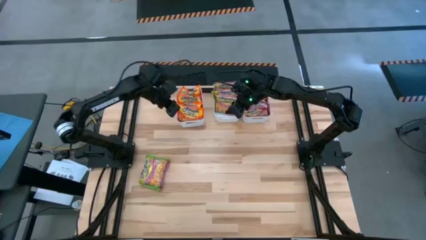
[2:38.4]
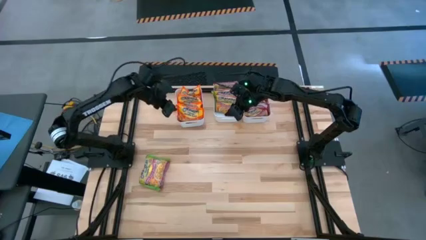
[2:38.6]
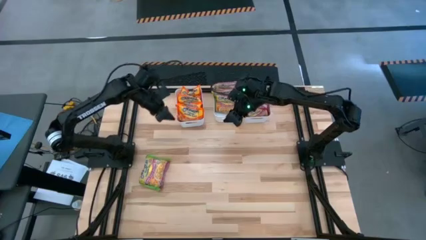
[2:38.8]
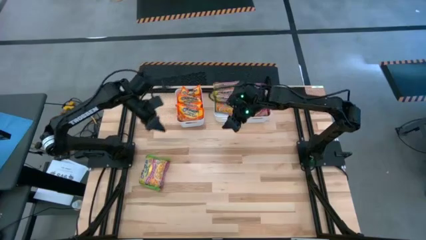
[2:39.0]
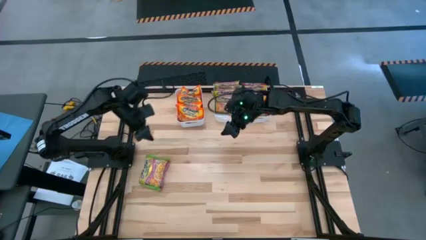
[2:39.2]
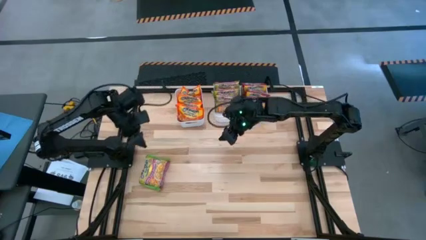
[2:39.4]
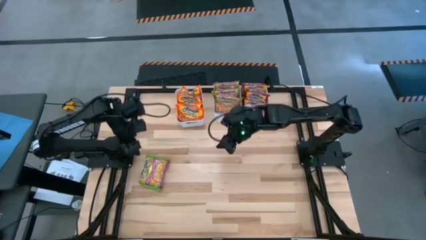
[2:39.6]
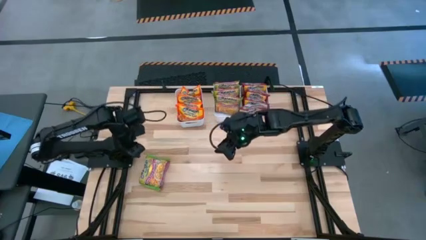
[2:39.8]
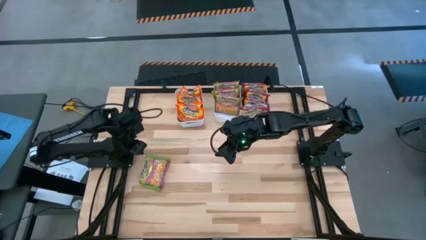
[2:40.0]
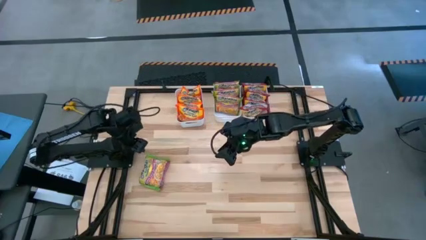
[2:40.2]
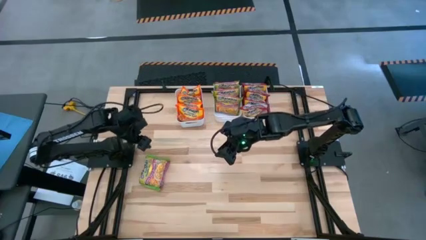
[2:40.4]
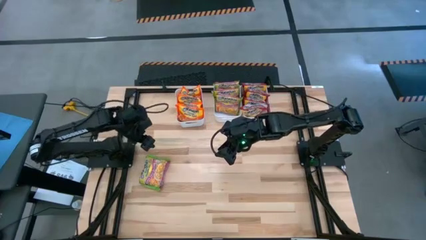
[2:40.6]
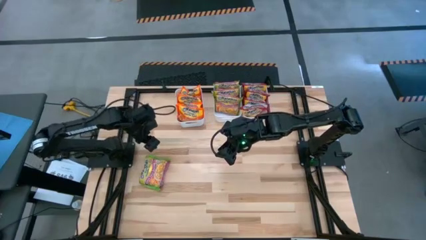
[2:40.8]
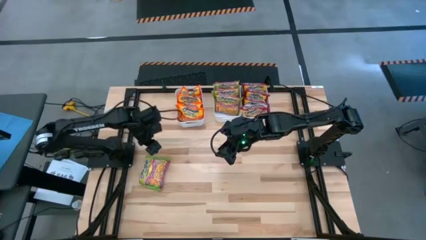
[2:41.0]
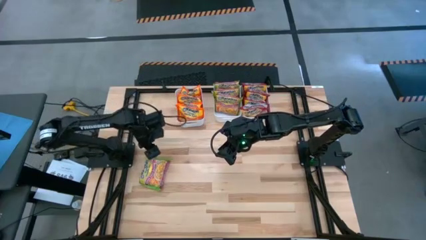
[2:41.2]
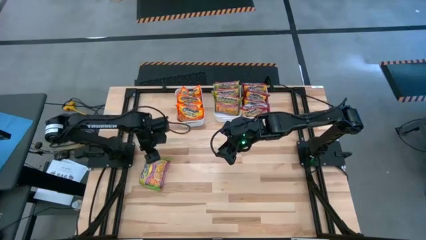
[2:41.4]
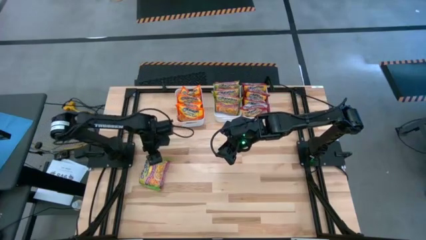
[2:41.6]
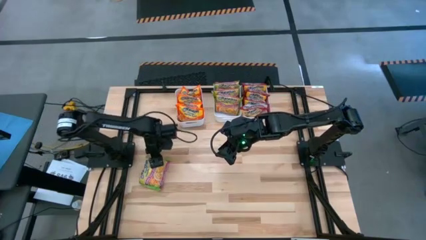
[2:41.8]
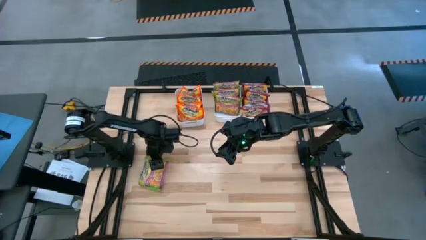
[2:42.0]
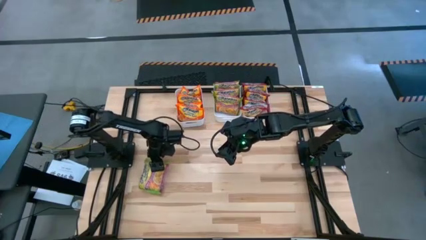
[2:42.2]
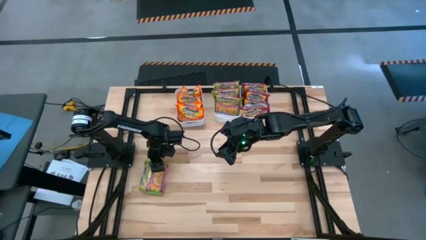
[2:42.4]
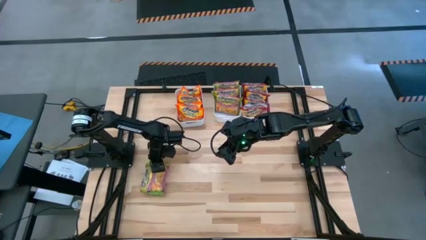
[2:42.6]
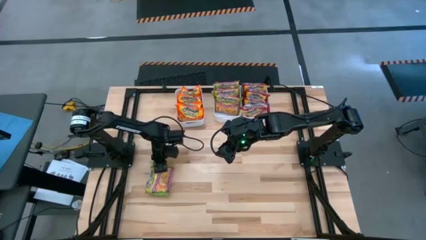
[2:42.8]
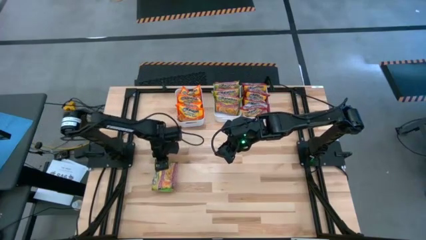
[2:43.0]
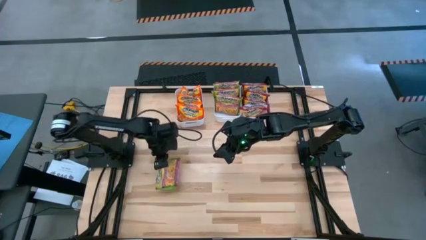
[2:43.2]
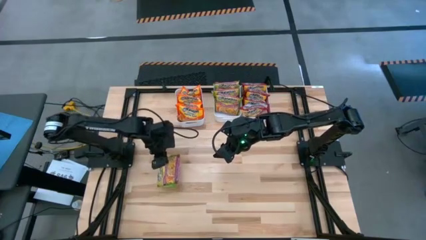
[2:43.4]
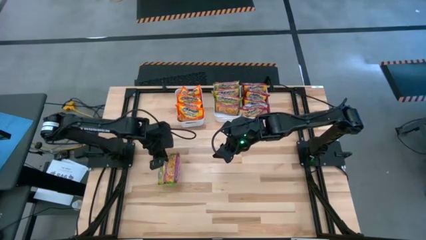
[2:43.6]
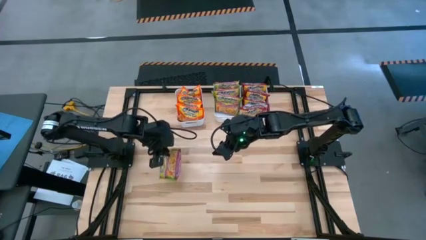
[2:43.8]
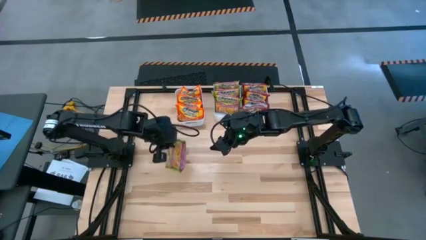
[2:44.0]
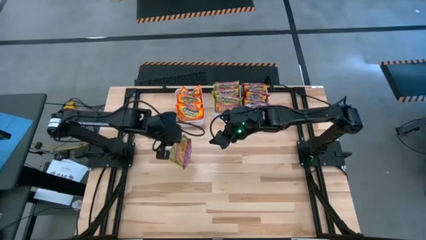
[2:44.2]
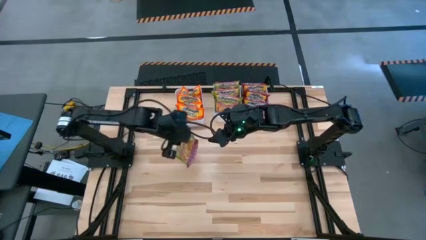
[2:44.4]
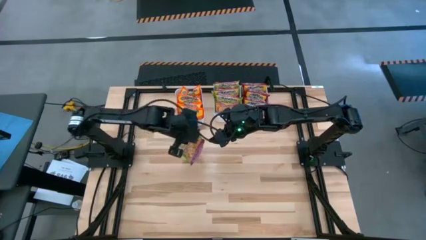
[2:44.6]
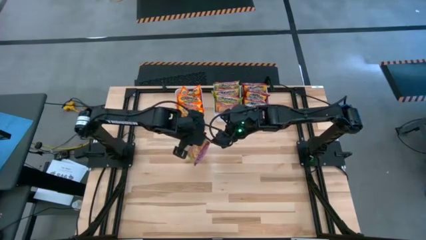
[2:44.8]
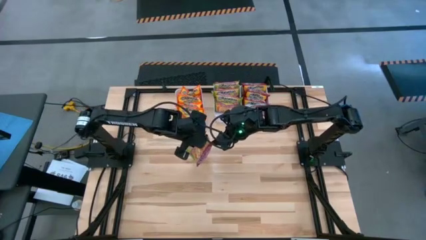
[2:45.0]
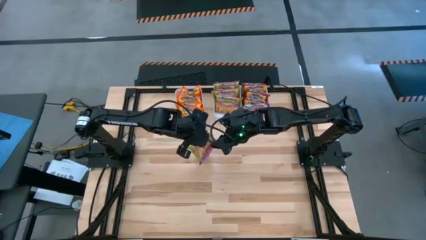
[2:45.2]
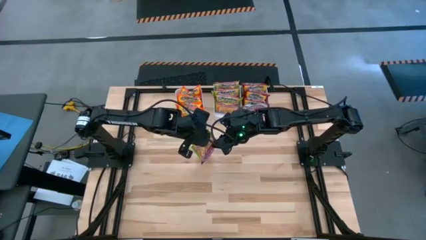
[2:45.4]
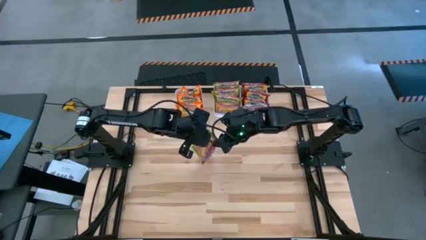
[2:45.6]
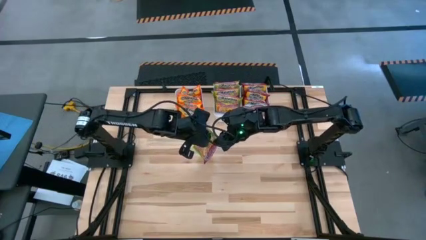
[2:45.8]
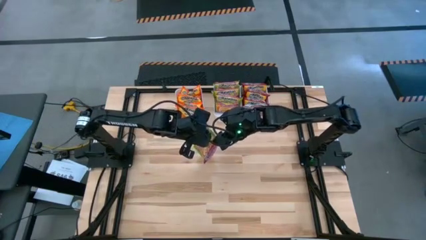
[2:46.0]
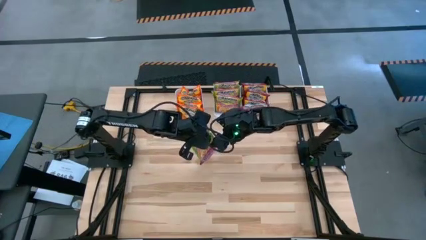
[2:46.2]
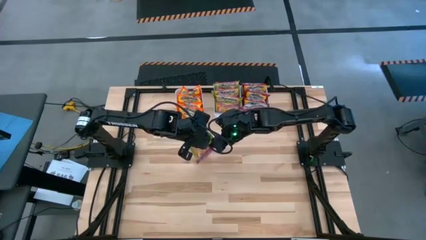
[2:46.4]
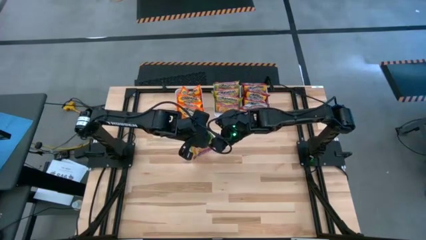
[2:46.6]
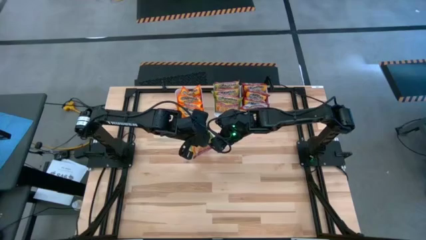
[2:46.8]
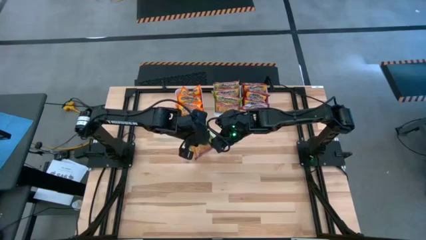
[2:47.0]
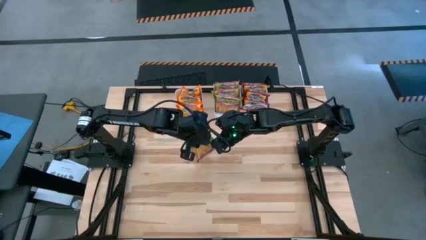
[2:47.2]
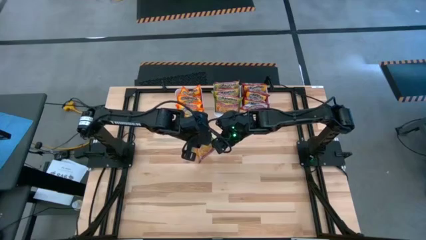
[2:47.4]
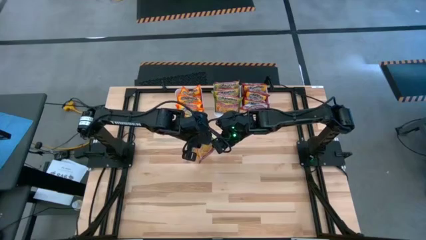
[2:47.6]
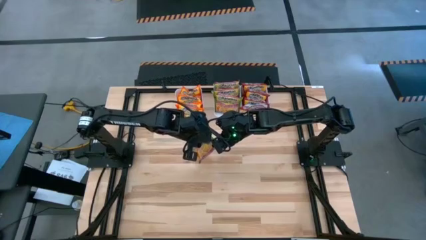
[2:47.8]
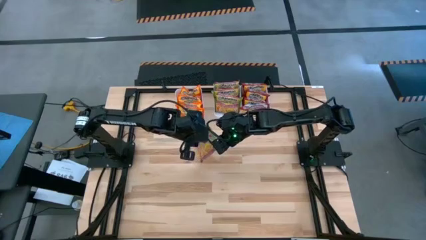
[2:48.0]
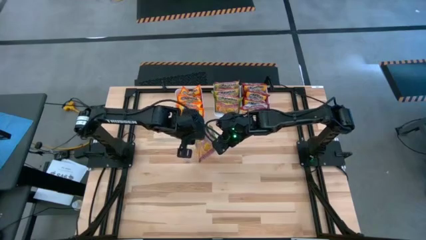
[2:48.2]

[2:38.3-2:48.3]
Task: Sort Maruchan noodles
Put the green noodle pack into the center white bin

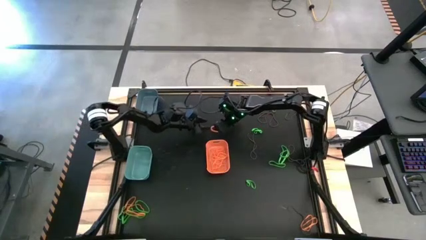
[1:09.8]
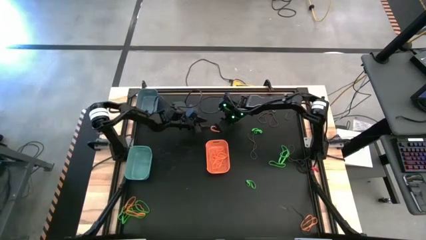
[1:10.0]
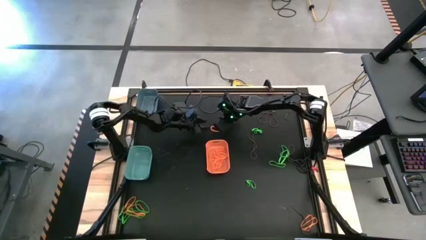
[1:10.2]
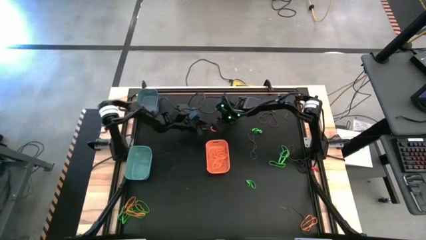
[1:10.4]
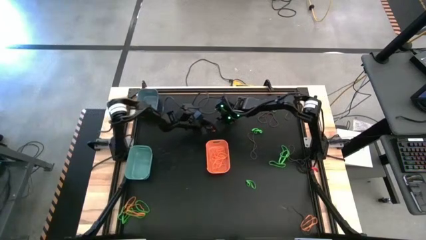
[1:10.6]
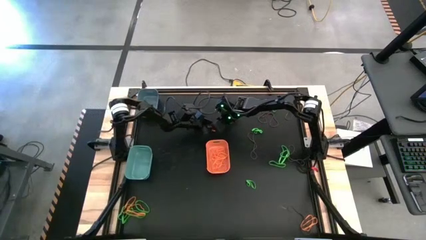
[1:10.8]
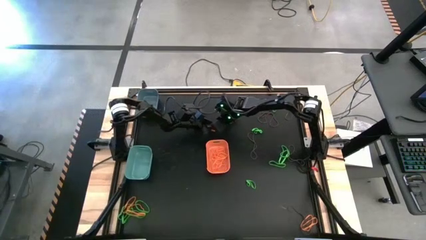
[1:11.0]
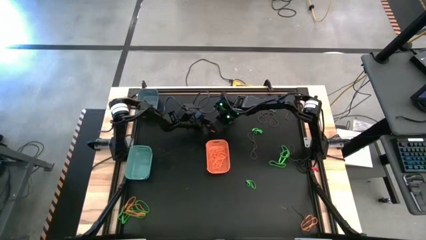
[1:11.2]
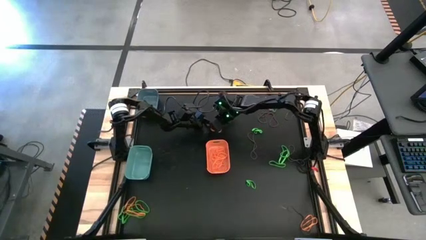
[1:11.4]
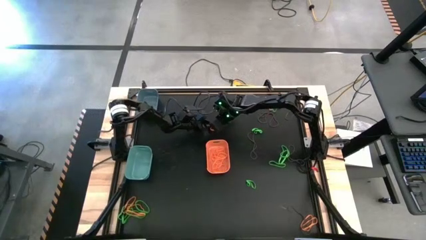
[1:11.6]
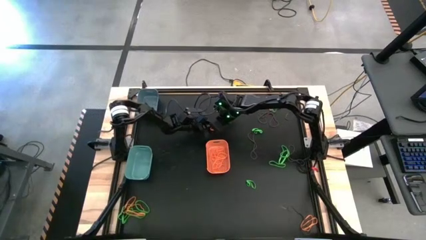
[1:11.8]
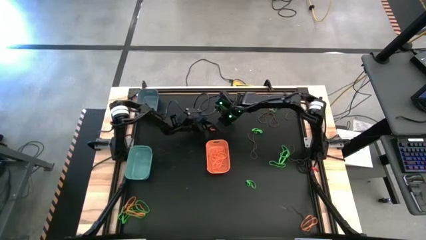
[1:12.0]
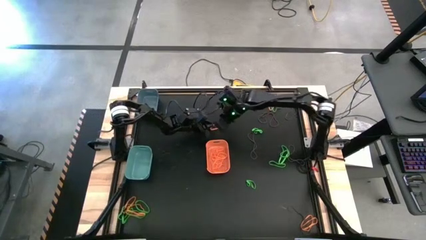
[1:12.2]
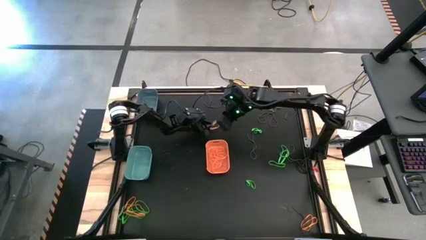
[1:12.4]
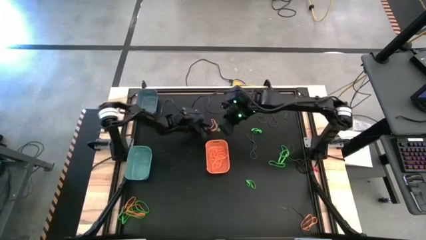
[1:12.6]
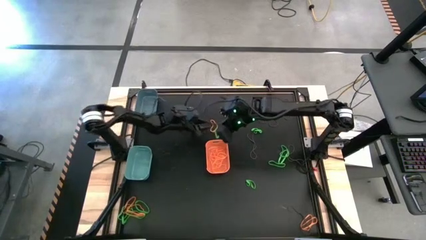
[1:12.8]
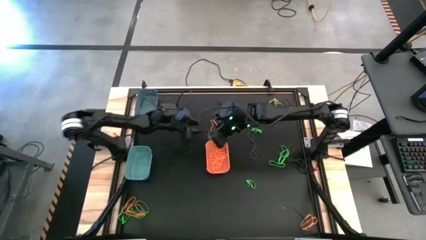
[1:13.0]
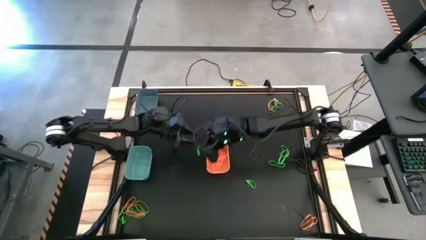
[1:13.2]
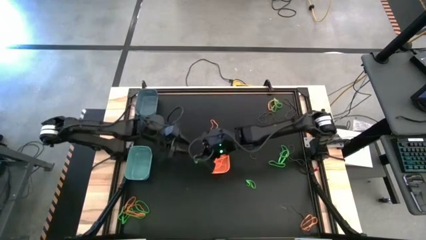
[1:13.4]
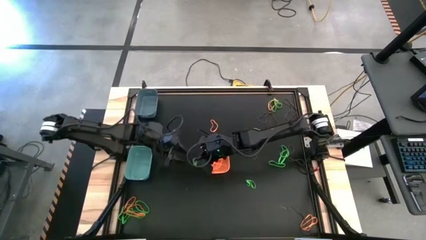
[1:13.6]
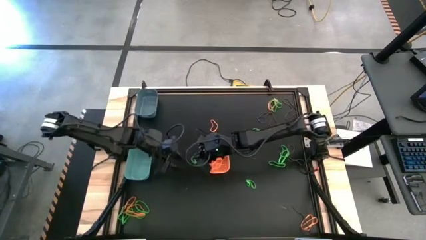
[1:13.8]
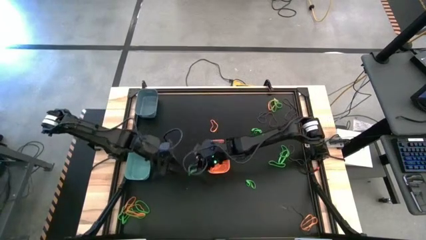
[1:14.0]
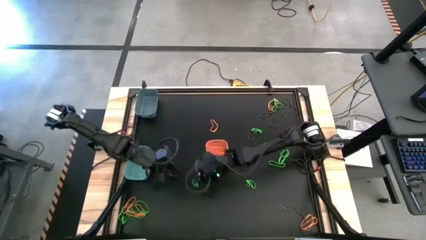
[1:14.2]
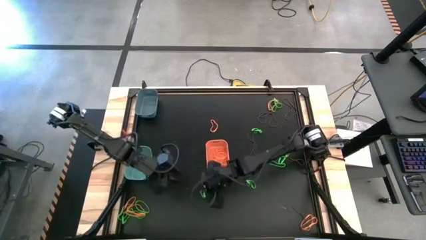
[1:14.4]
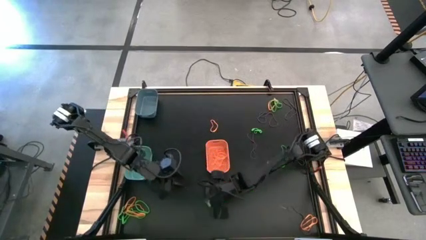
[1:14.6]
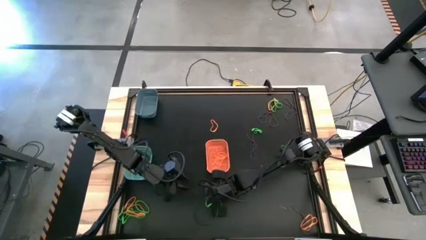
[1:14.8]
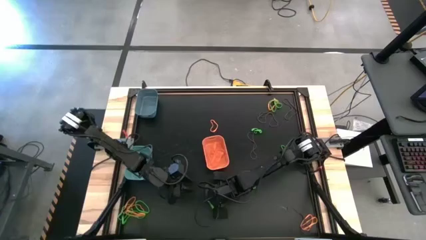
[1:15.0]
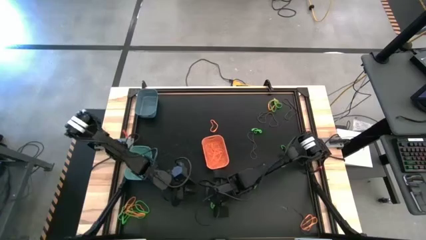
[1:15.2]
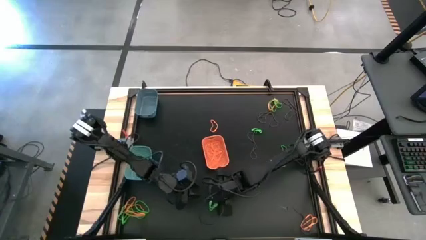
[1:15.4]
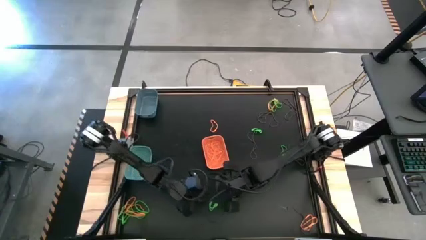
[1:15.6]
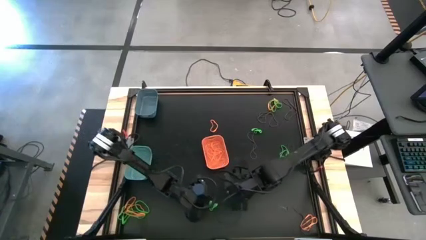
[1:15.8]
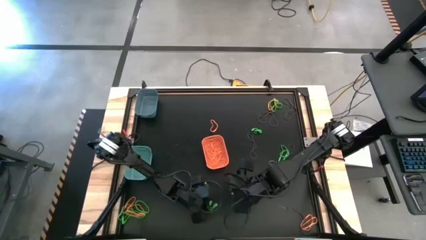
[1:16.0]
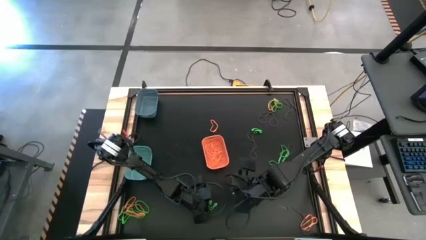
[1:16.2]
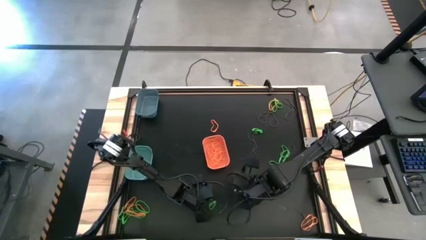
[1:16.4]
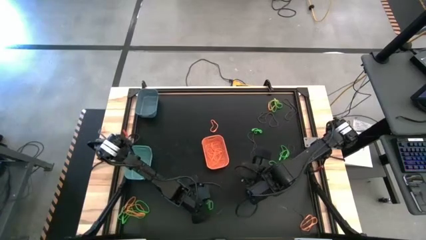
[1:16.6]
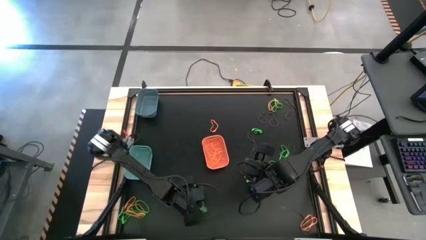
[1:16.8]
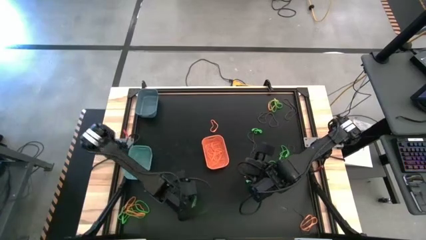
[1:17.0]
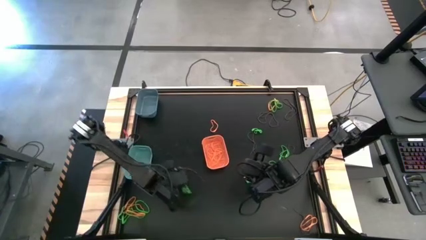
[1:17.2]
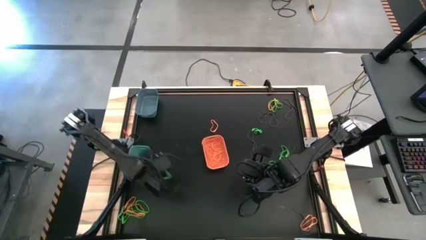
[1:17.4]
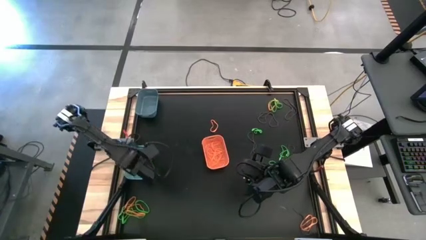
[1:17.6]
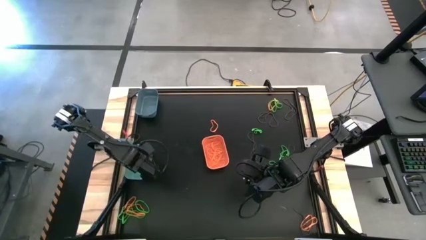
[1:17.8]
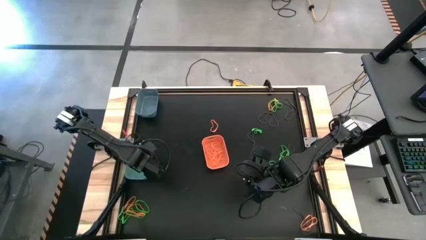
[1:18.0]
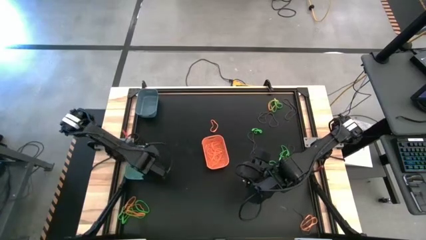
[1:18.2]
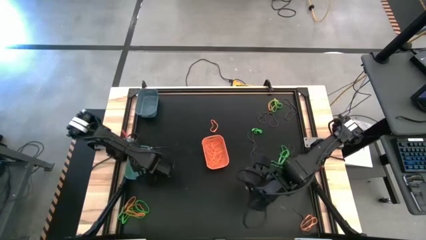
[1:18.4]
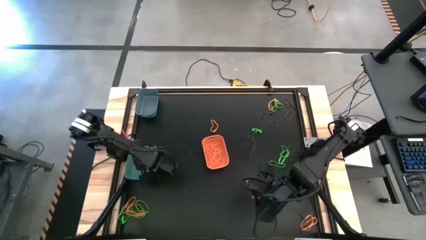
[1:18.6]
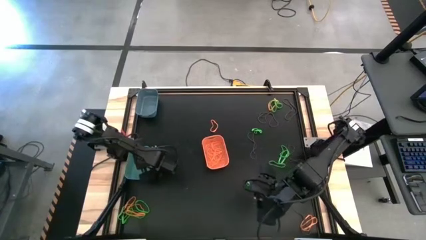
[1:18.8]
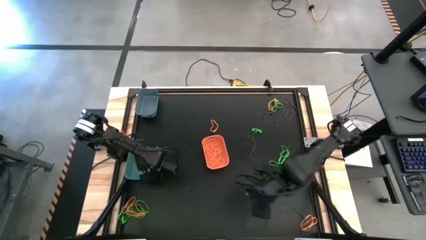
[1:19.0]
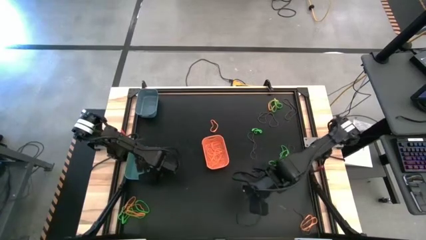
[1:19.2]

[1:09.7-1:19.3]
Task: Sort rubber bands into baskets
Put the green rubber band into the light sea green bin
